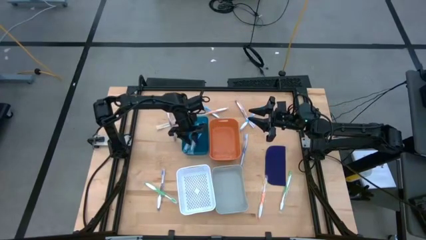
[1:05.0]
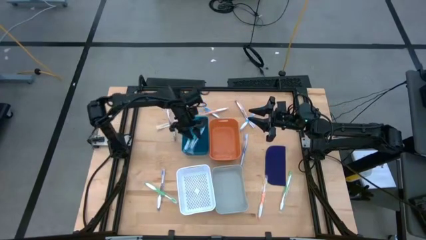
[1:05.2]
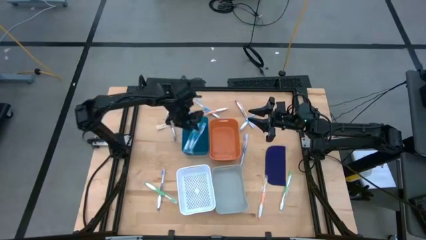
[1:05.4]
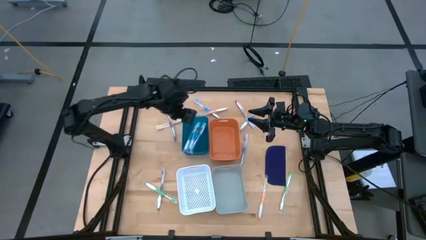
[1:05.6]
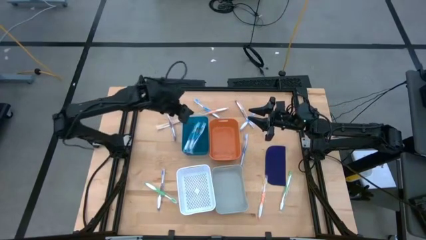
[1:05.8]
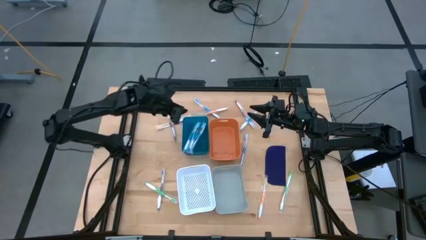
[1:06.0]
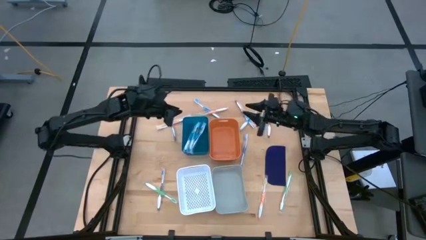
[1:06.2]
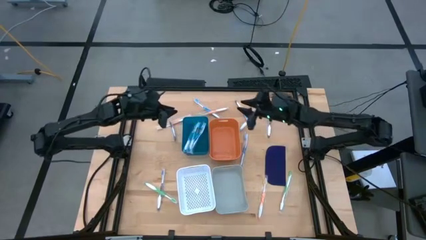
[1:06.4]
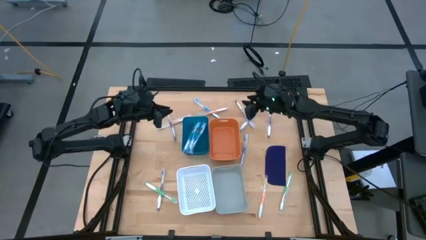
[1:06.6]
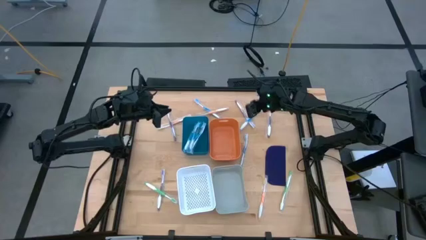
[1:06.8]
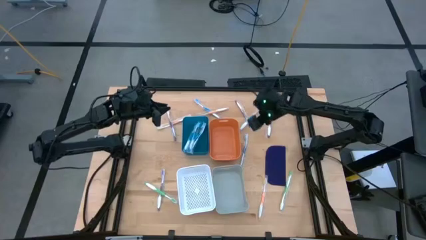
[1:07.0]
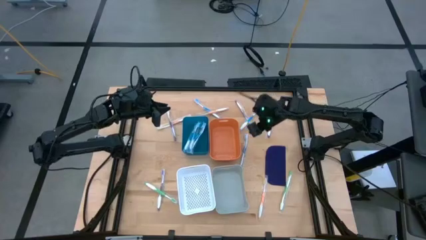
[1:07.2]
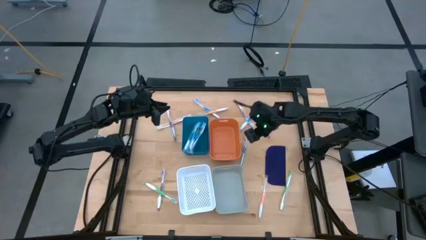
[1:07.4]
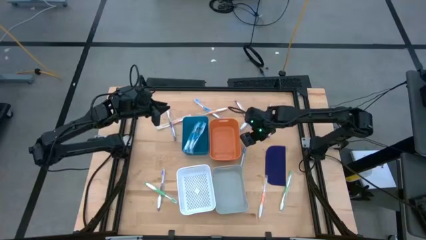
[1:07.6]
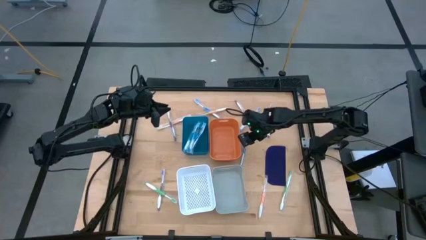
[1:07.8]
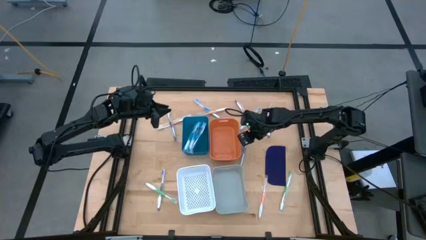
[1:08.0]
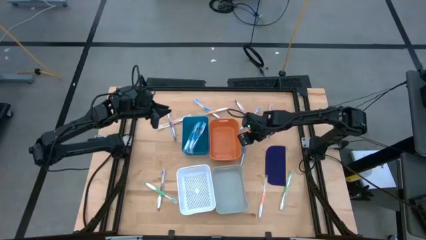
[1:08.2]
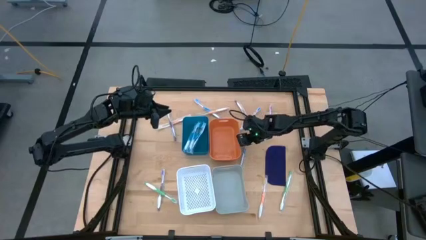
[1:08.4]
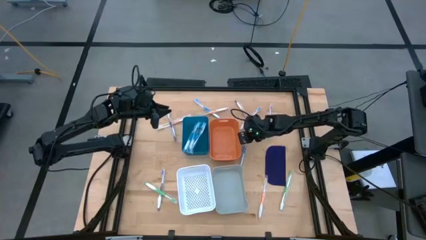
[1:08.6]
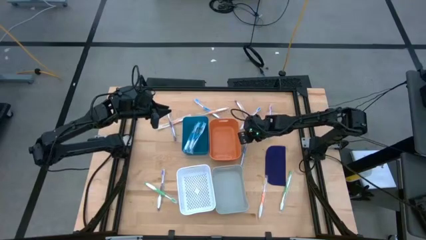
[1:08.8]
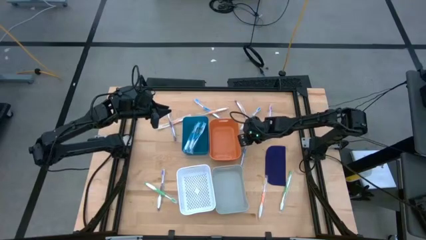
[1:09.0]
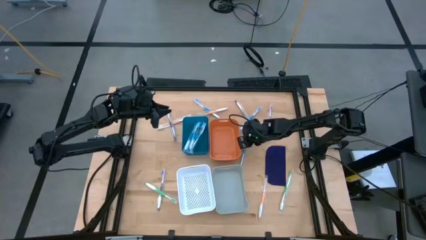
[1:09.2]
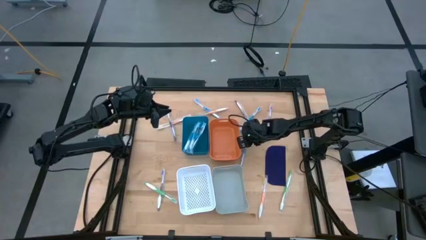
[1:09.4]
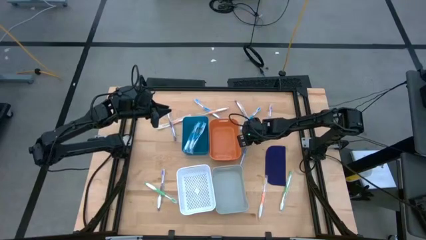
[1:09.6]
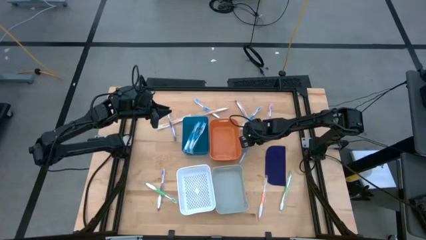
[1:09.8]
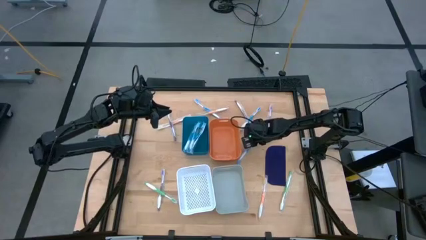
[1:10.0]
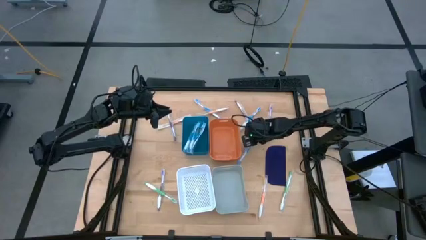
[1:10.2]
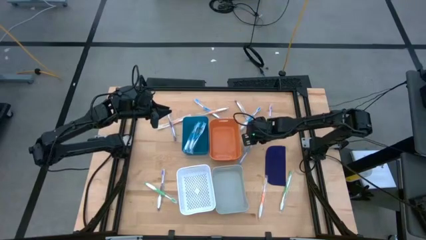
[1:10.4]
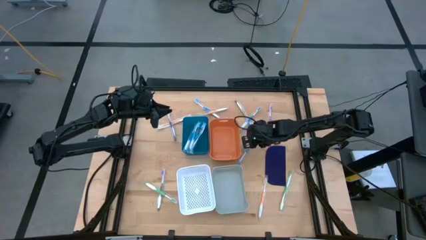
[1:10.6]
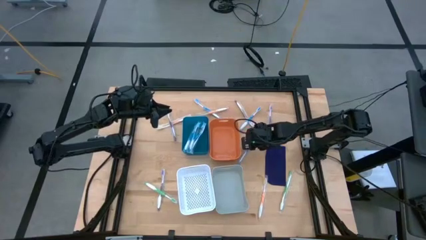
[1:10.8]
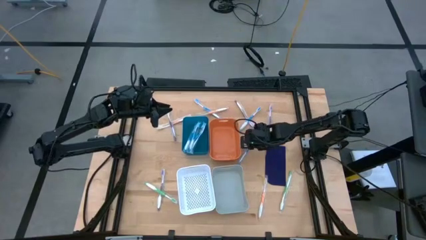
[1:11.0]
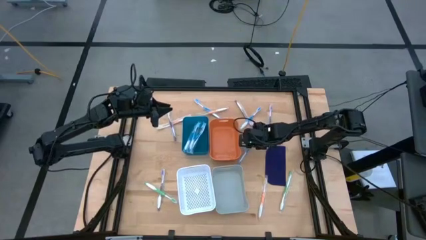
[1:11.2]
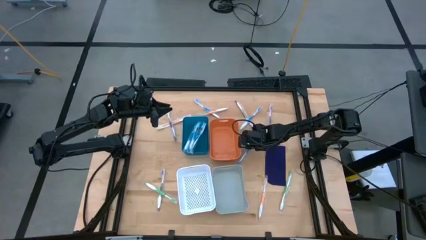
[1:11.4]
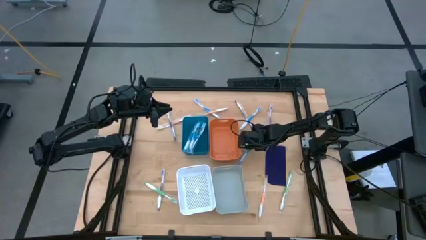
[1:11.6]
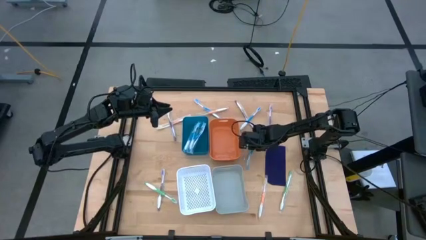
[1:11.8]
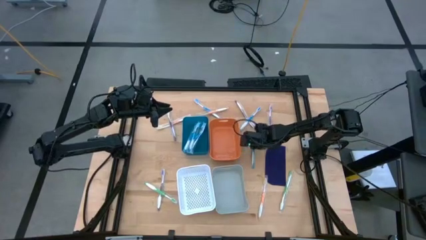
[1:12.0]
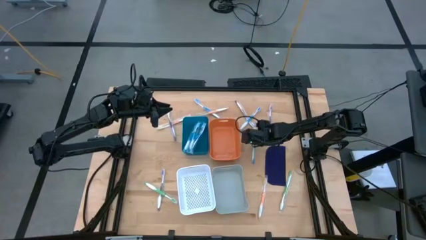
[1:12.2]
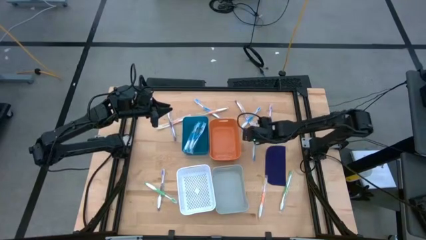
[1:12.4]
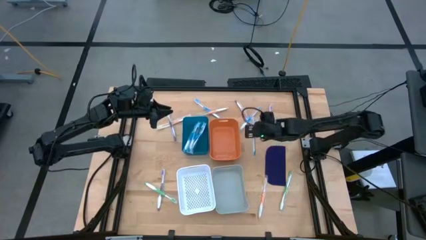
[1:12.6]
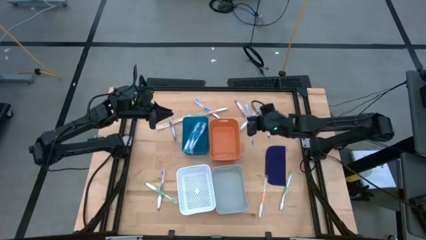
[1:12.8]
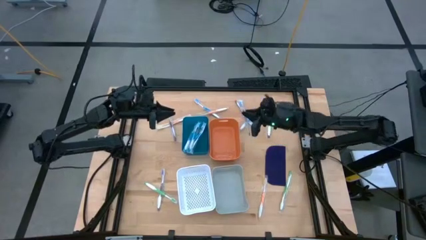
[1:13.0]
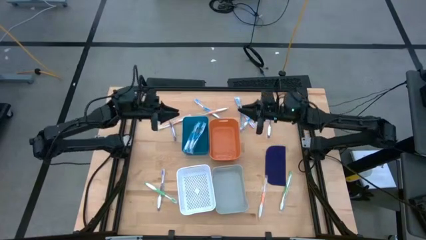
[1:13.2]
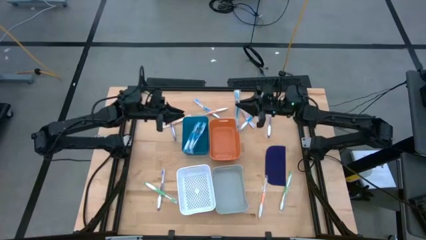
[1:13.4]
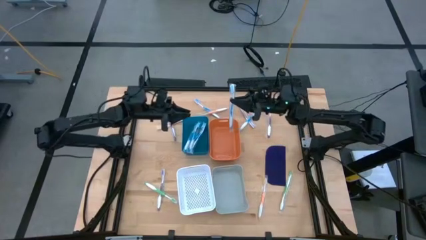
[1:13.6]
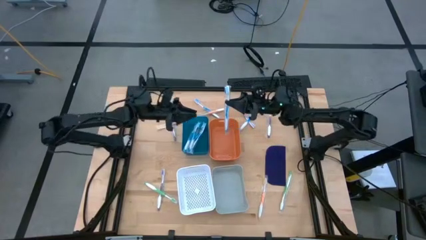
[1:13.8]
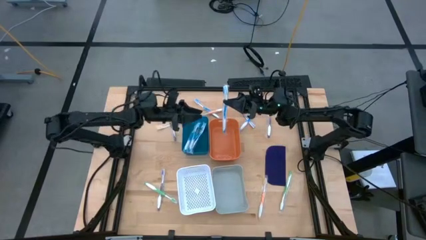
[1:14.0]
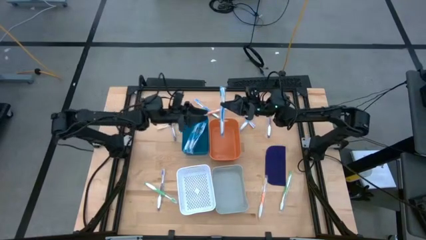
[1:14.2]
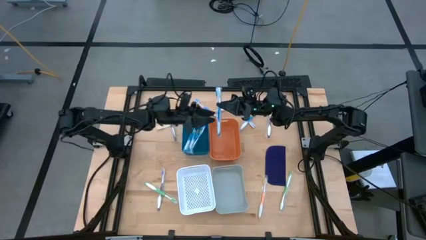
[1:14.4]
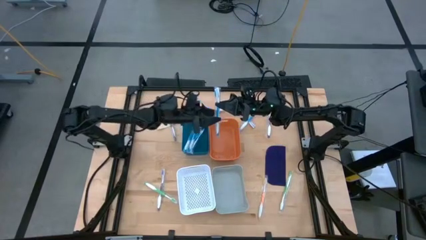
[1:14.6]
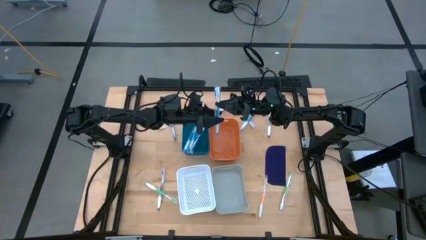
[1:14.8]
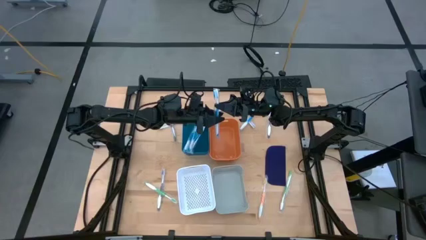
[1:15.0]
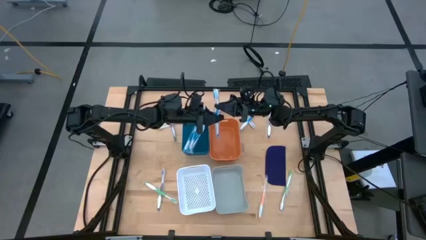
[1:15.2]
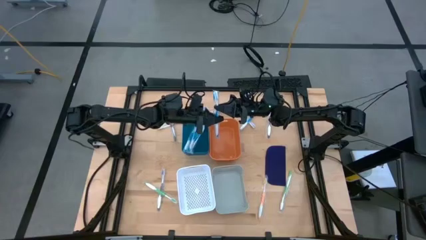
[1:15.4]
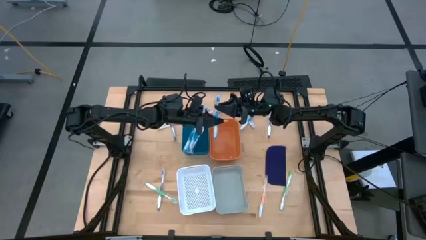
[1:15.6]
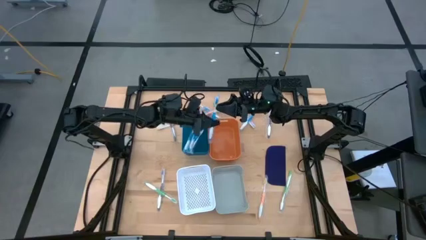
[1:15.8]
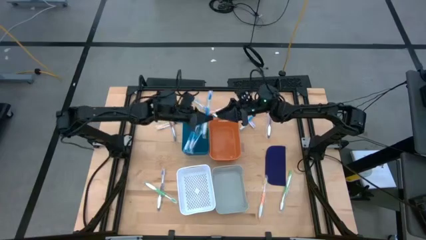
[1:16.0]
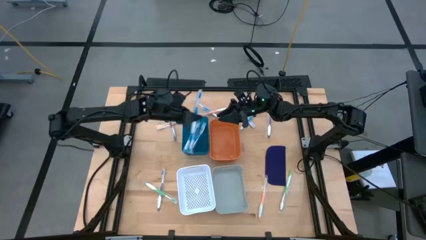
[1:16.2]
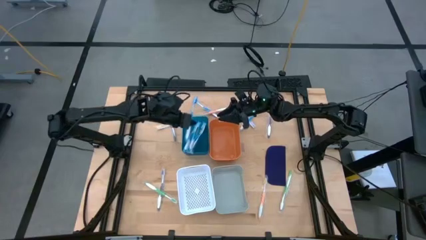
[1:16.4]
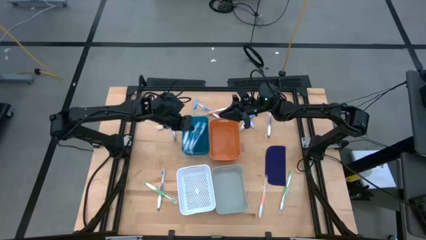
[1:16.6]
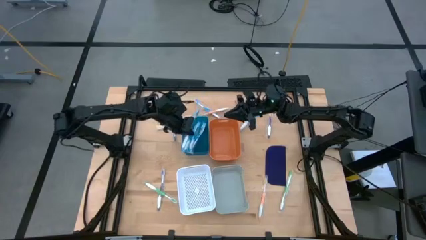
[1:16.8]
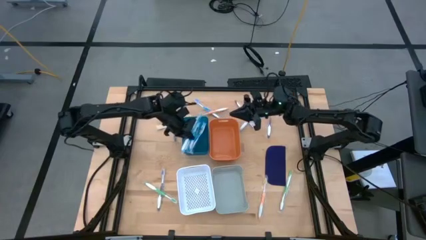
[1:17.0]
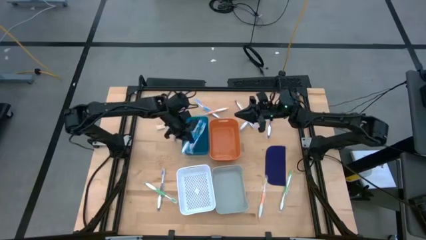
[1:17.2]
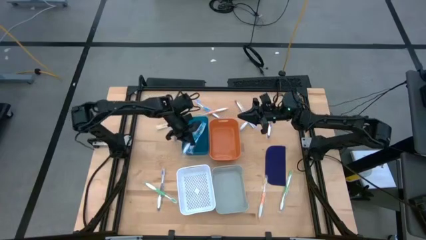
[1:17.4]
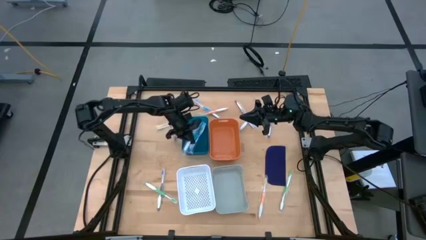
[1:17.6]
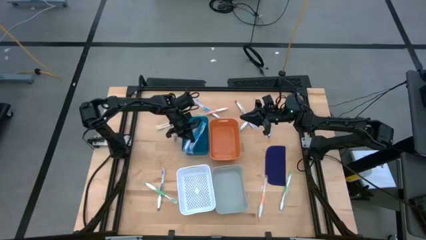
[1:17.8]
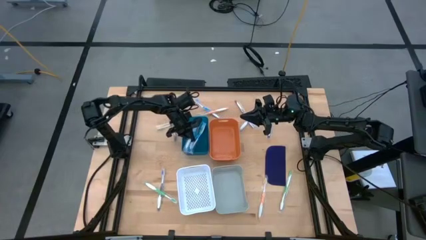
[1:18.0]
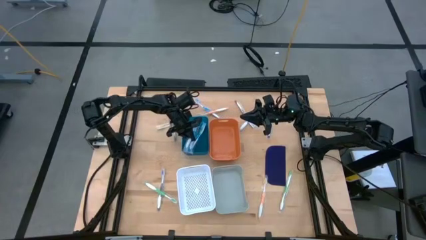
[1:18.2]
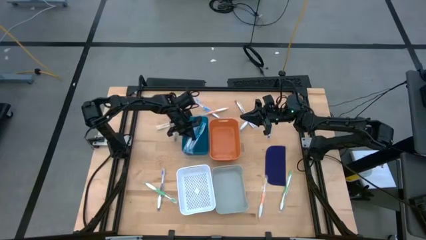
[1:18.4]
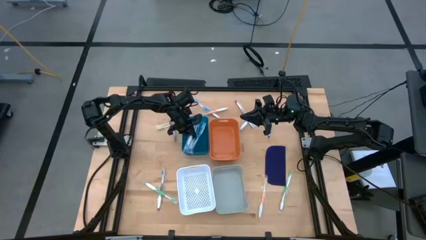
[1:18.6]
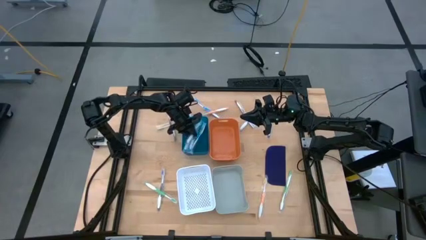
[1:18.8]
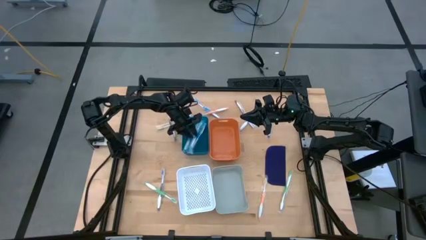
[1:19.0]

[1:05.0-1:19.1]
Task: Pick & Place Toothbrushes
Put the blue toothbrush into the blue bin

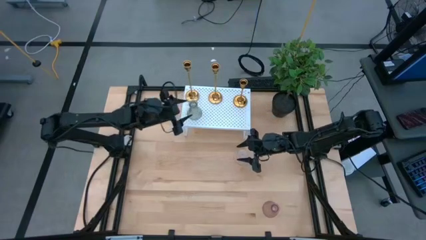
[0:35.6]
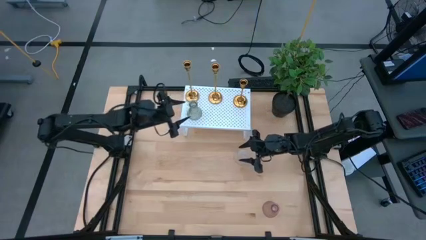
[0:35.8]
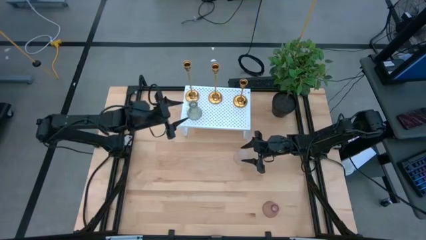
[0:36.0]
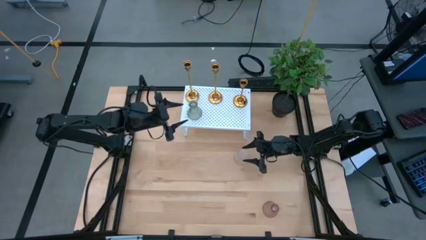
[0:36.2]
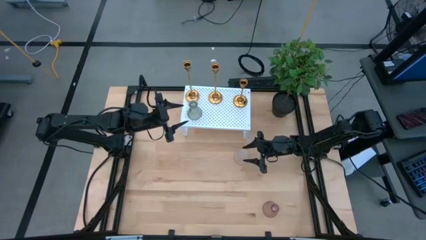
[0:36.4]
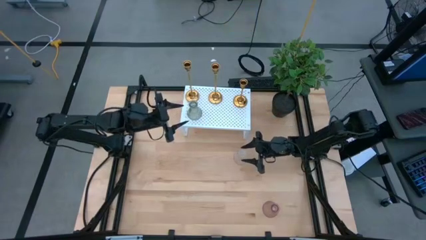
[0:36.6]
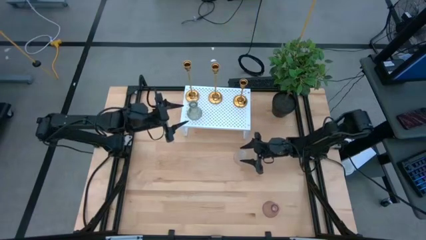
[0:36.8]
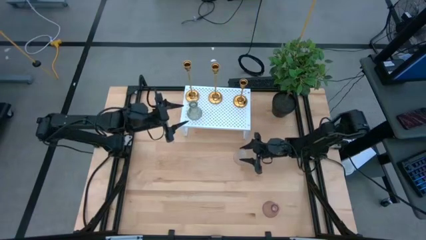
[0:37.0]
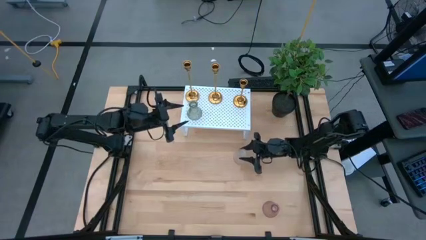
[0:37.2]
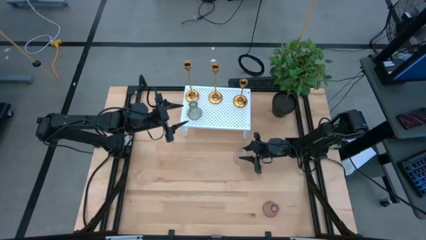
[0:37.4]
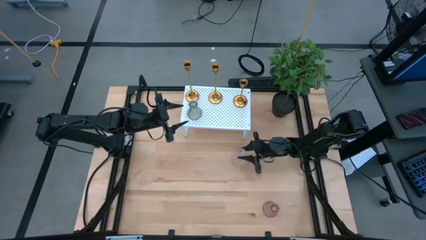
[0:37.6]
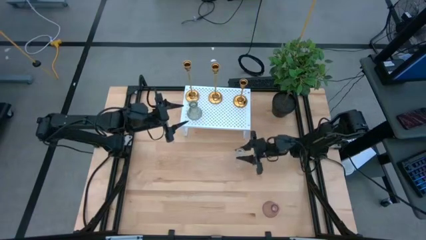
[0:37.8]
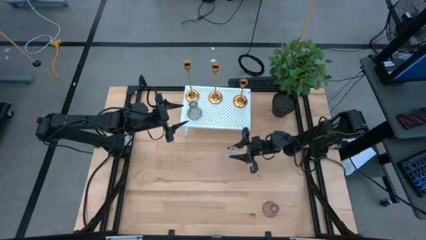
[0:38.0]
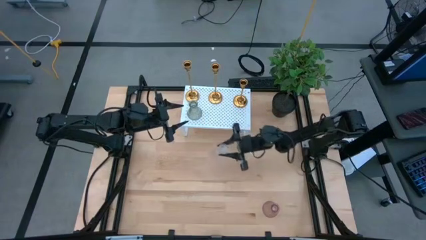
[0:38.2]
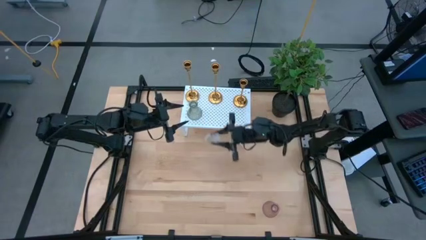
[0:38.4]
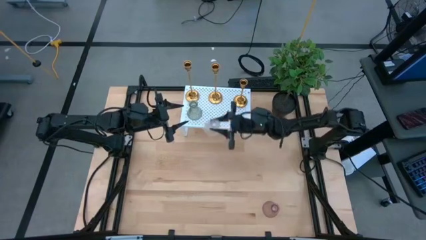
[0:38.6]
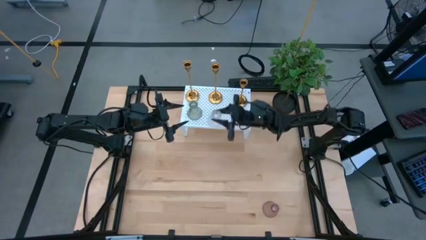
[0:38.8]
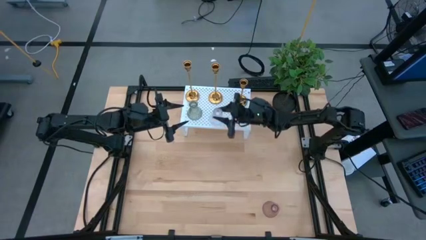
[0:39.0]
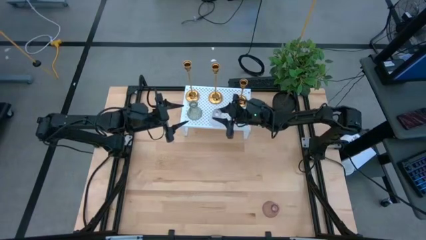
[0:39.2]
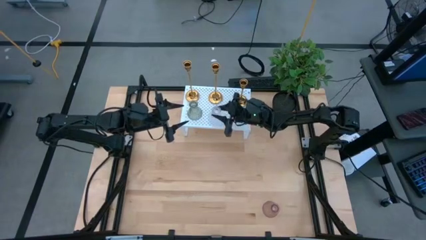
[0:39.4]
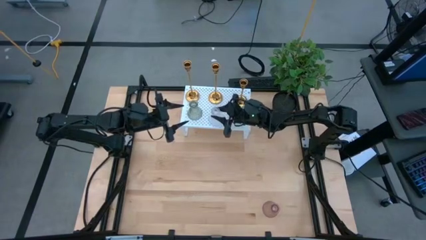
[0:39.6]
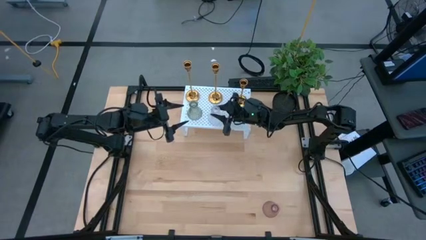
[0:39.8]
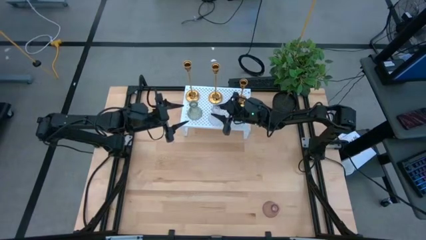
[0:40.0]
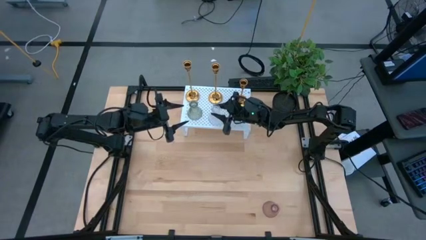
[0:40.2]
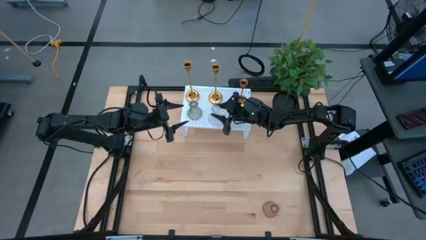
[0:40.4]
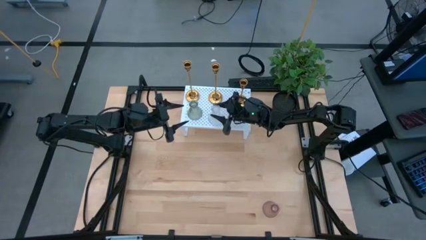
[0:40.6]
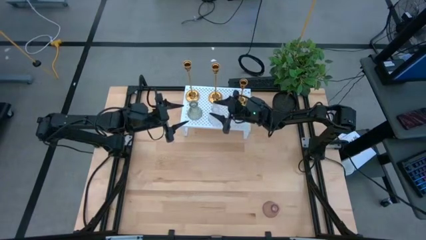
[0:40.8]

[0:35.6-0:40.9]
Task: Pick & Place candle stick holders
Put the transparent glass candle holder on the shelf aligned with the other glass candle holder
